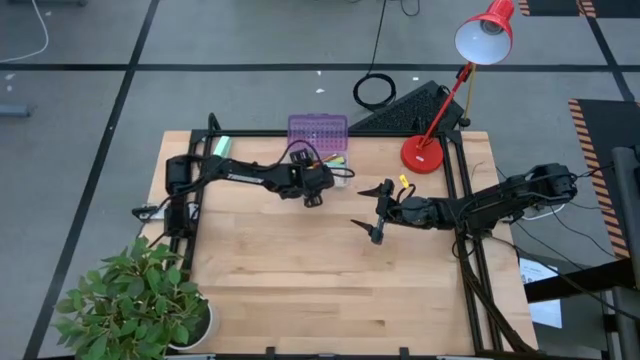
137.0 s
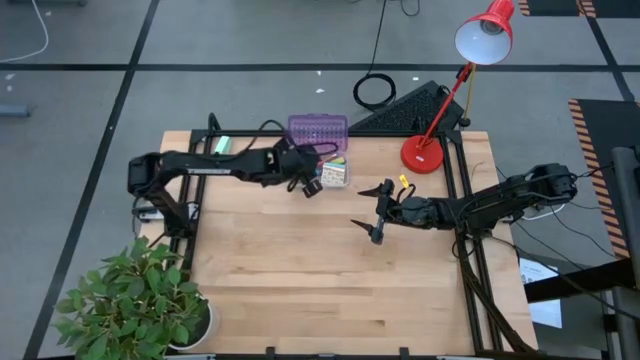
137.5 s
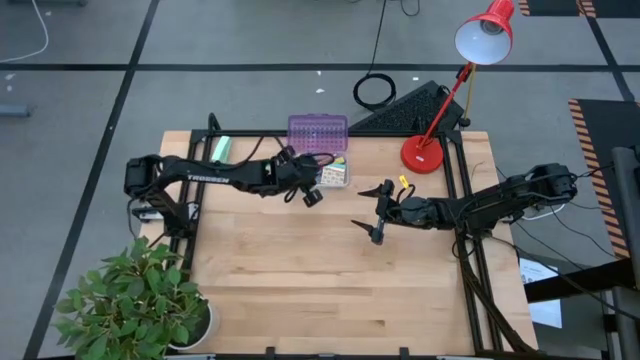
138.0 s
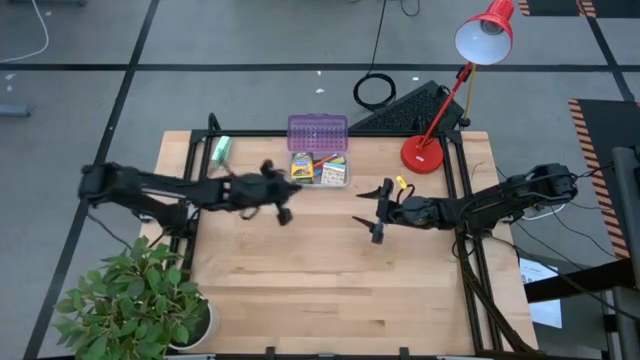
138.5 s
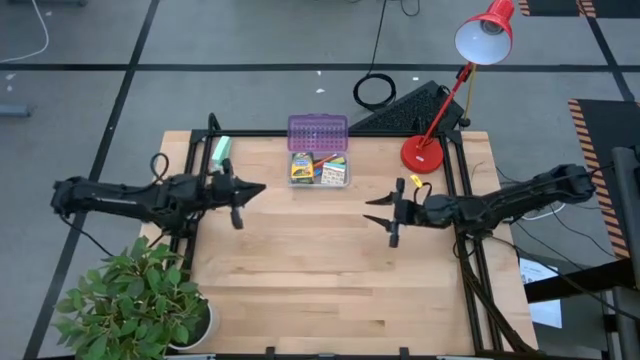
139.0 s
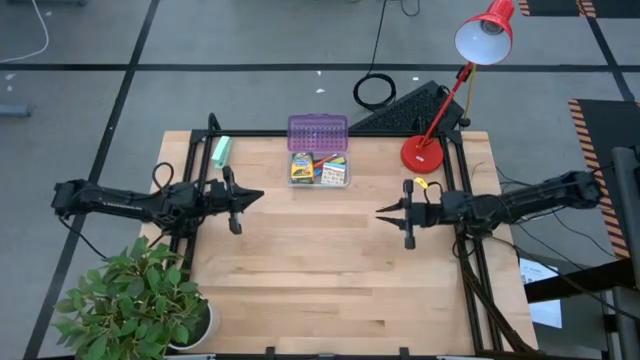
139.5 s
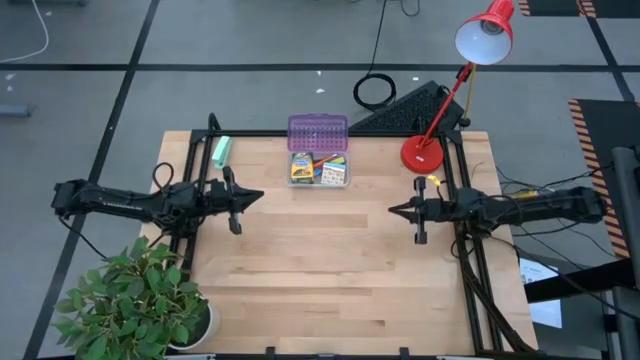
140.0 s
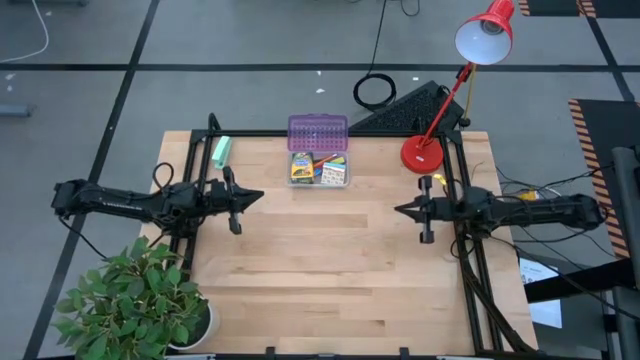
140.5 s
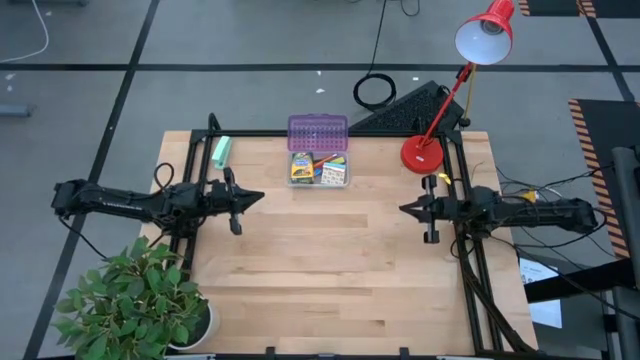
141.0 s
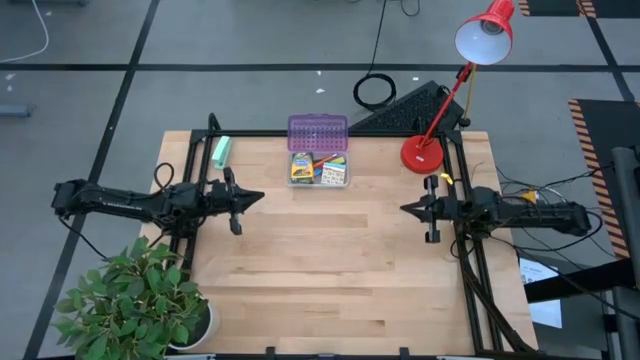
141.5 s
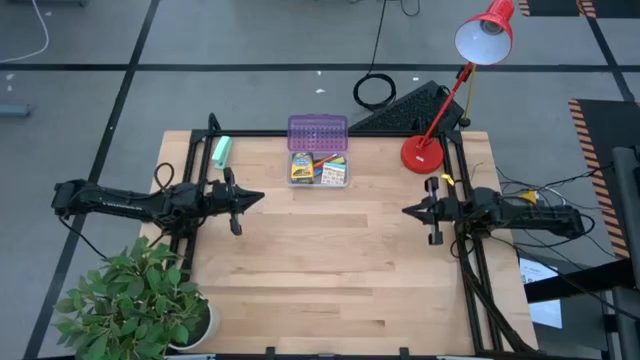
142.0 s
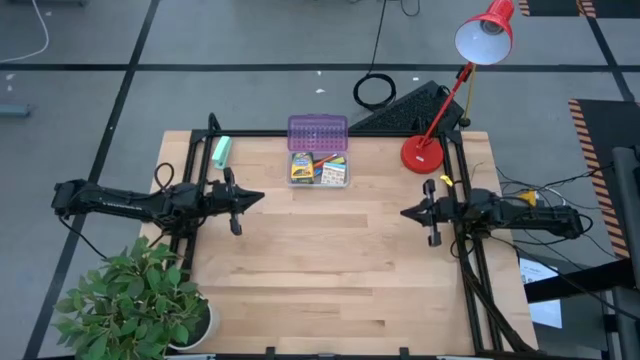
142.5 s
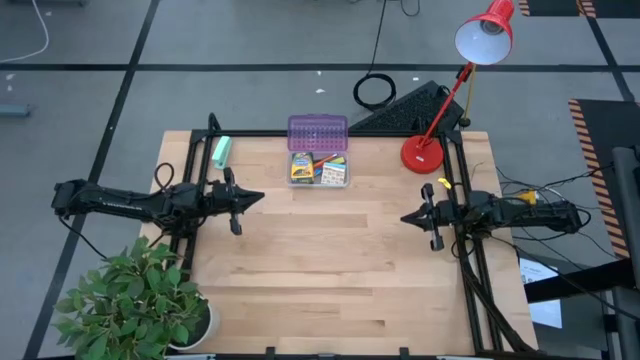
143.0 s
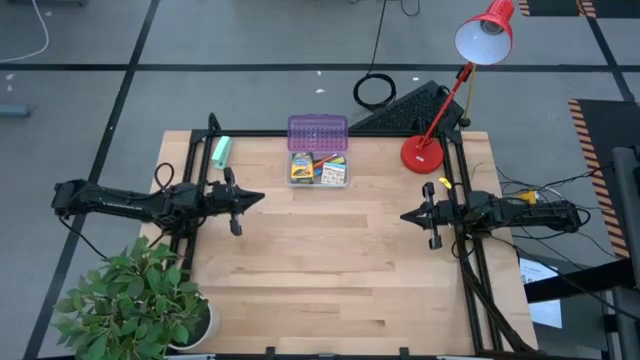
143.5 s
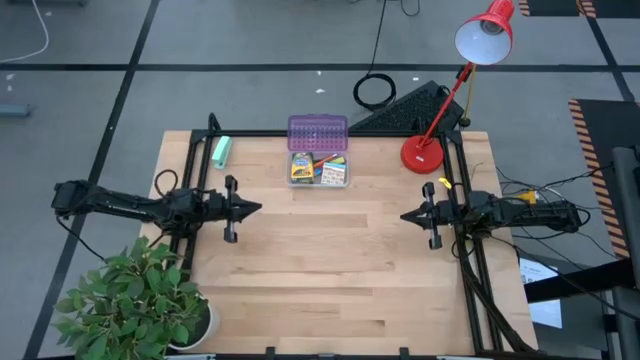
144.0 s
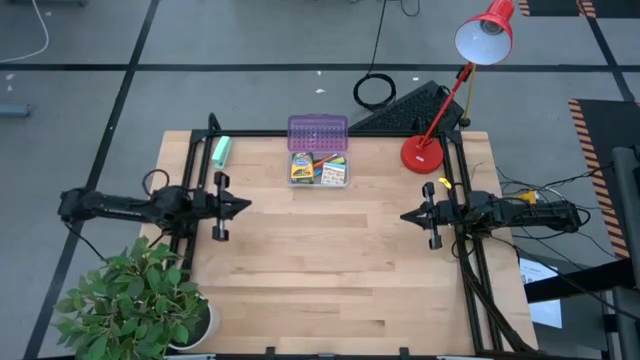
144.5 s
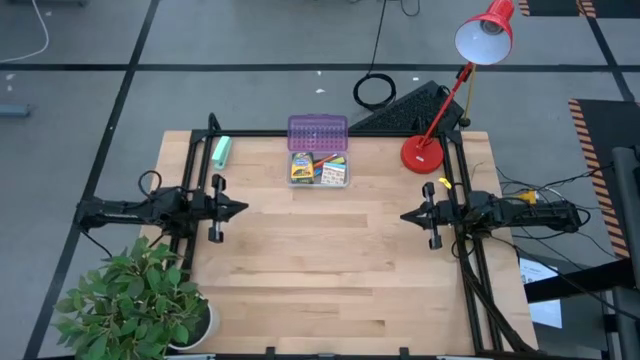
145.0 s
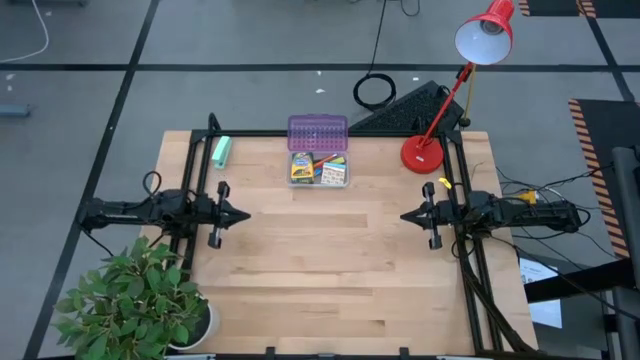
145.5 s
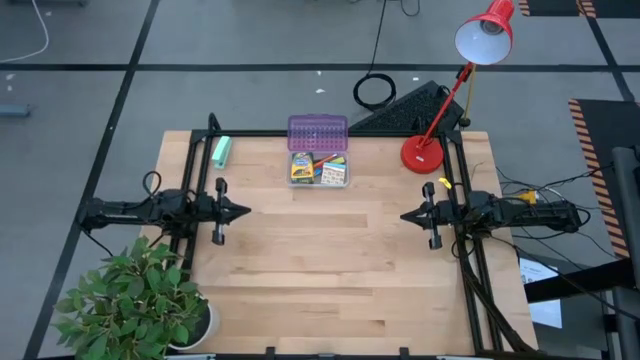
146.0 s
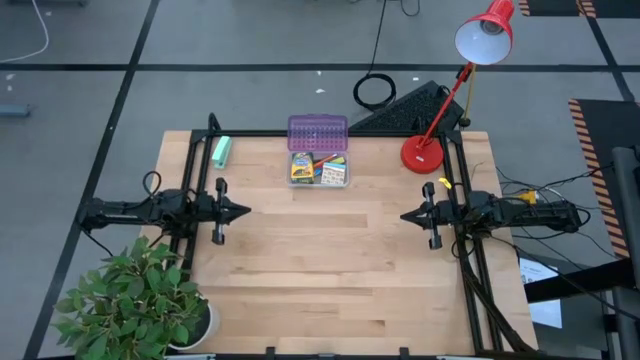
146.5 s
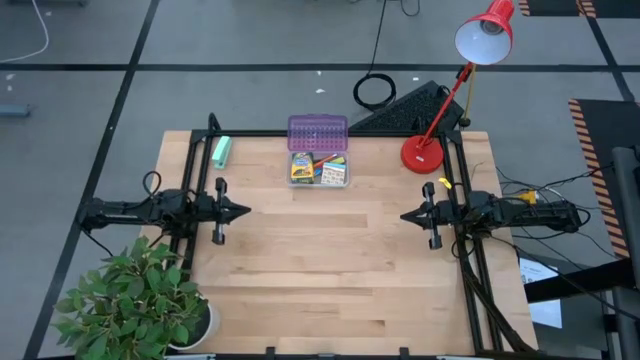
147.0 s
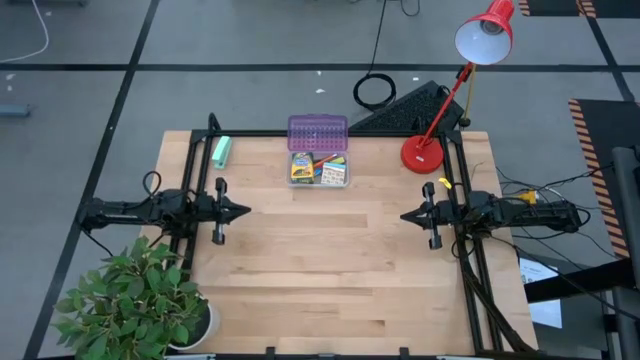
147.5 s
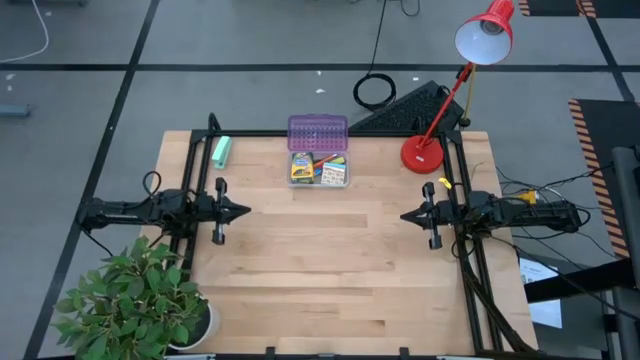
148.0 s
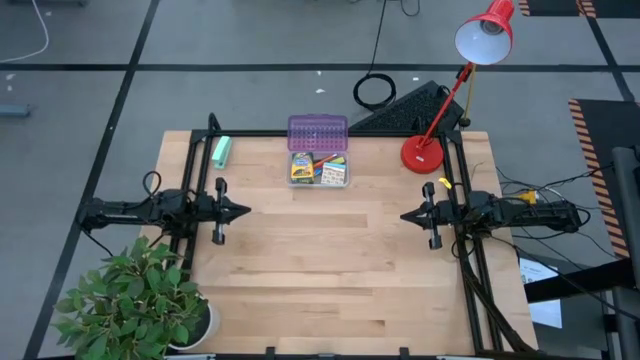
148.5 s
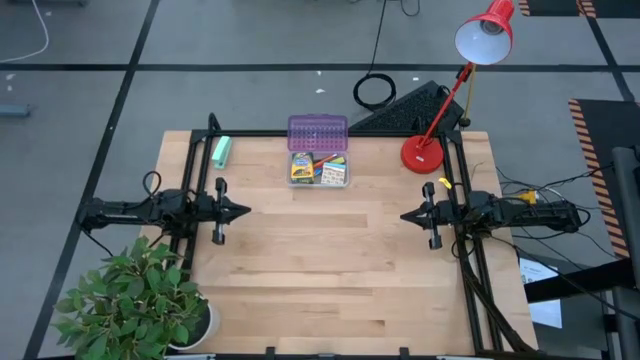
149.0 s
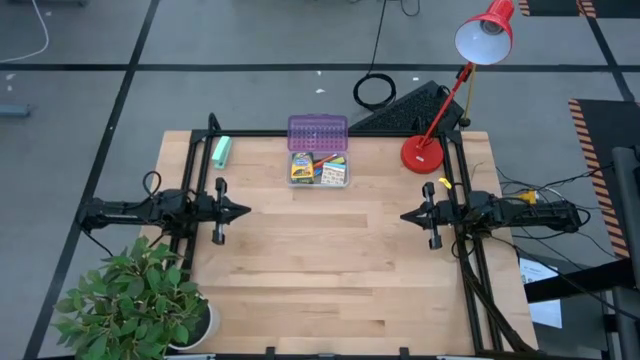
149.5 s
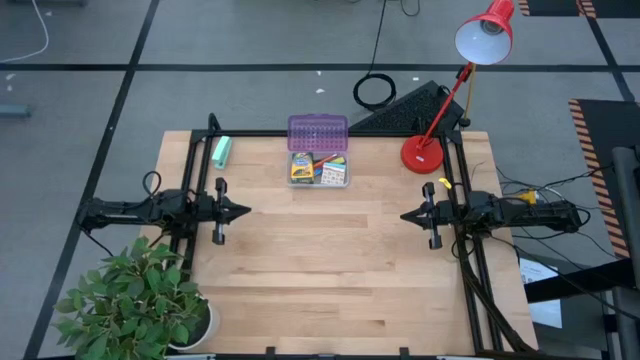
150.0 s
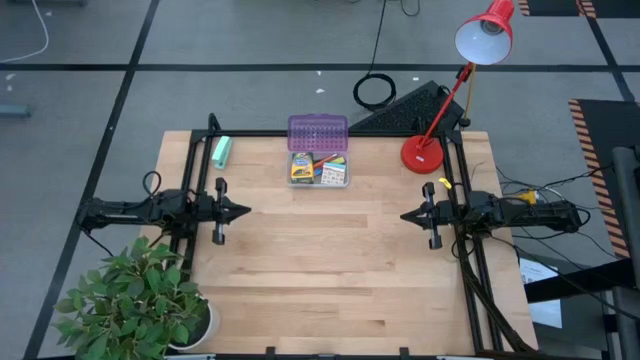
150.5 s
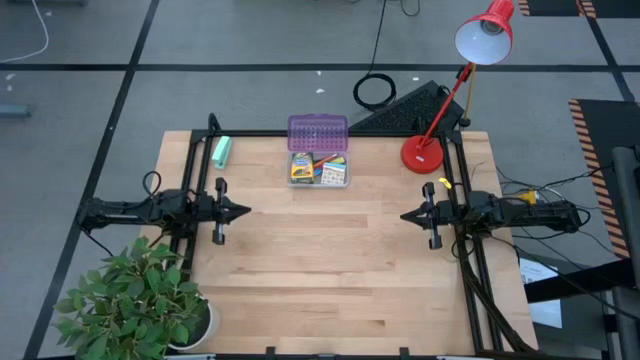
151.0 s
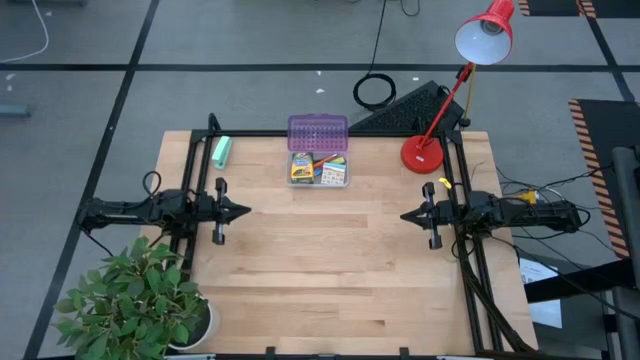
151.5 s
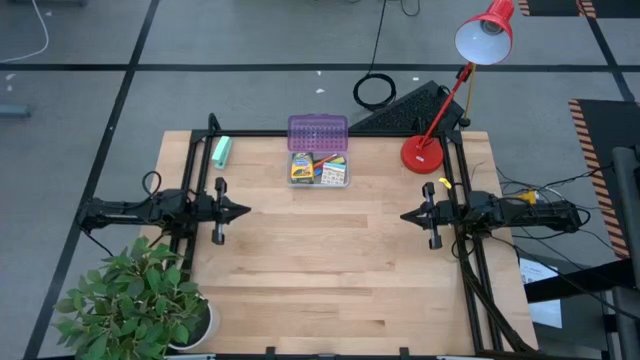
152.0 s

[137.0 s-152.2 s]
Task: Pack school essentials
Return to Home Position

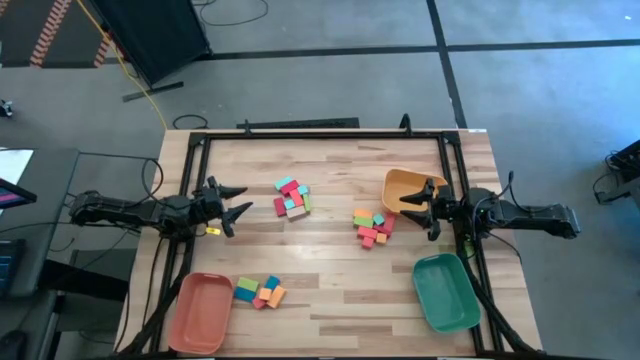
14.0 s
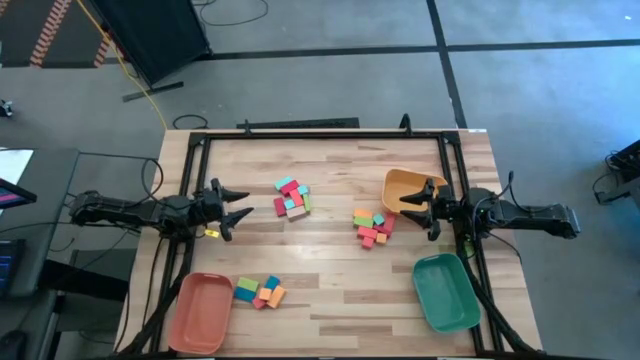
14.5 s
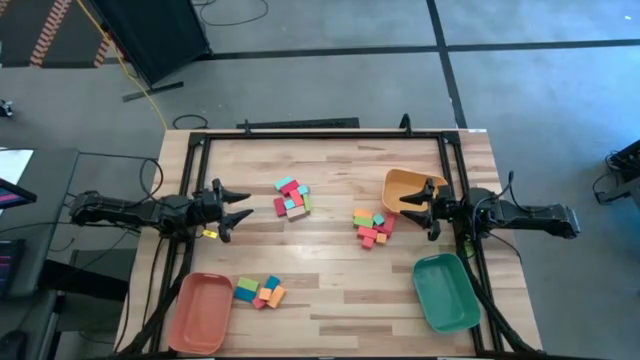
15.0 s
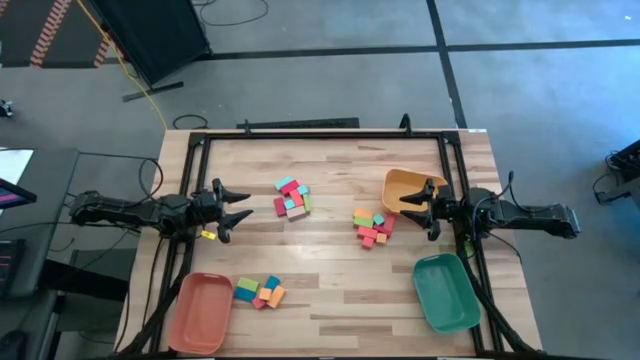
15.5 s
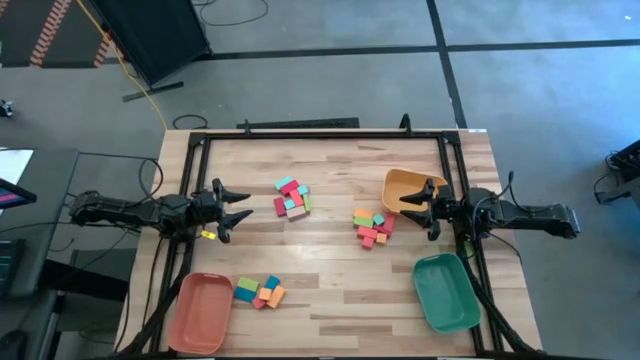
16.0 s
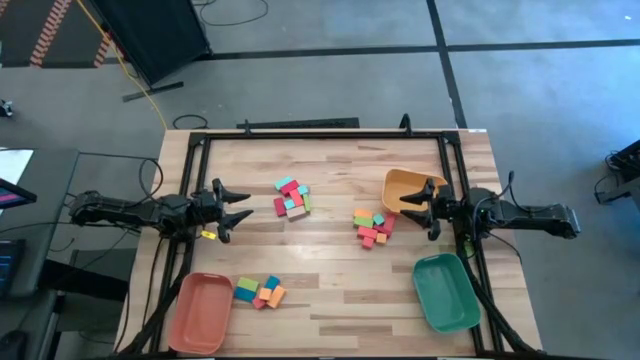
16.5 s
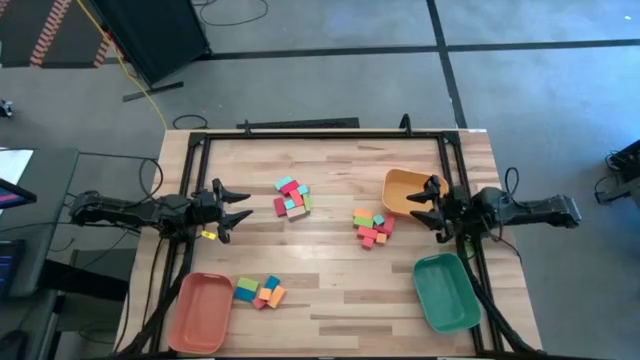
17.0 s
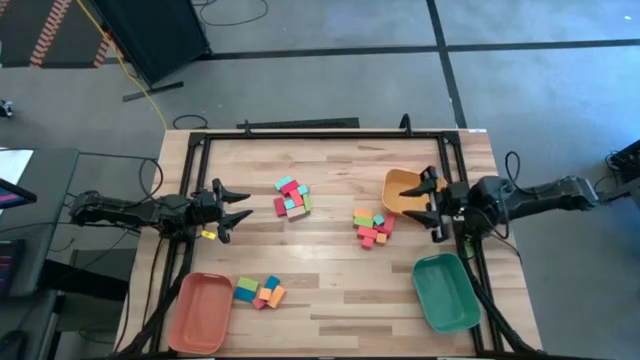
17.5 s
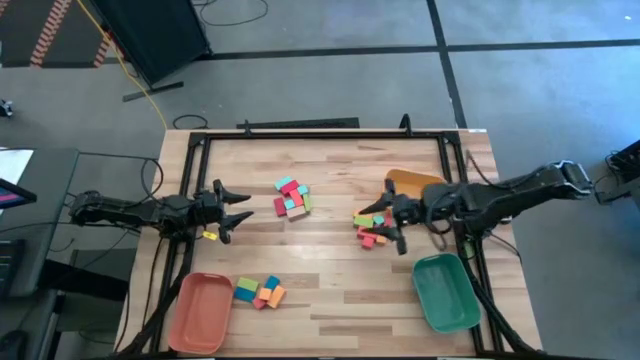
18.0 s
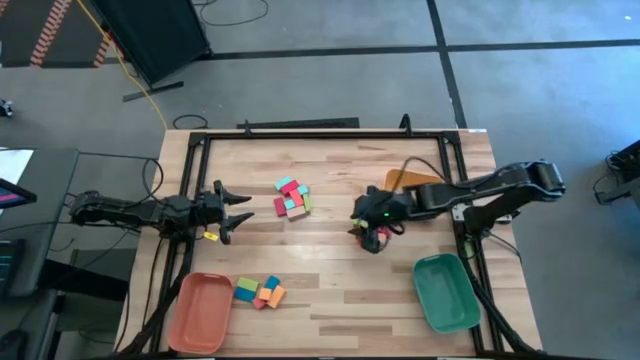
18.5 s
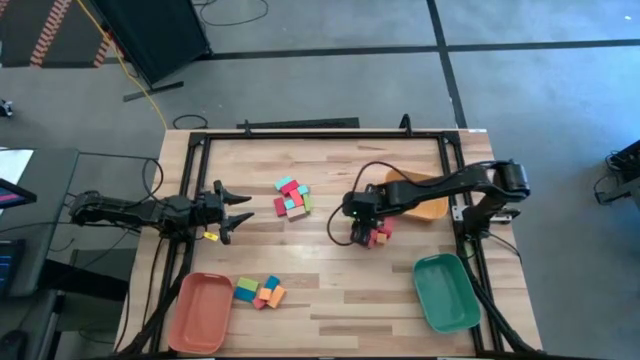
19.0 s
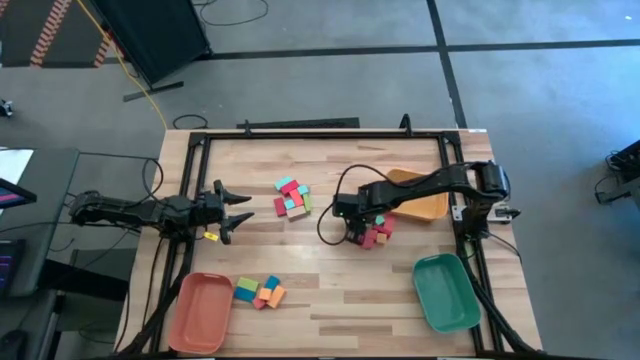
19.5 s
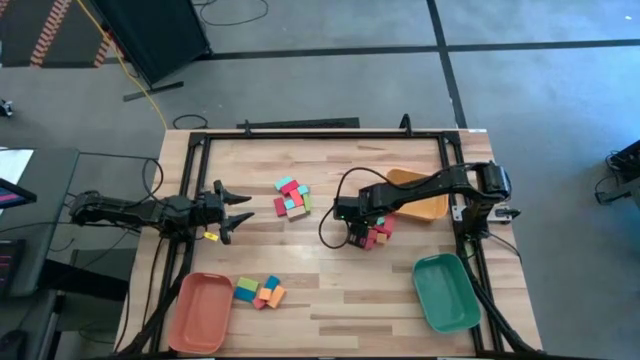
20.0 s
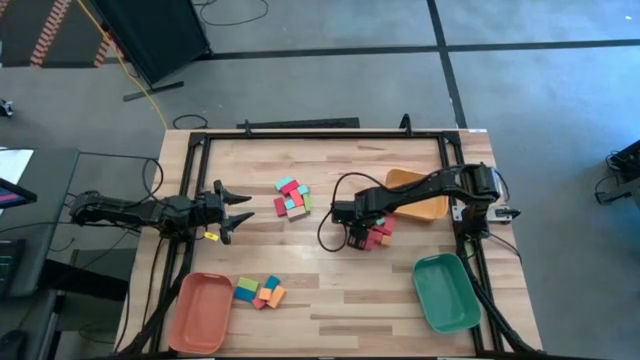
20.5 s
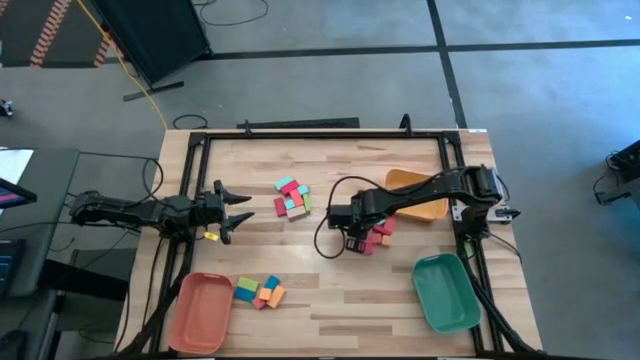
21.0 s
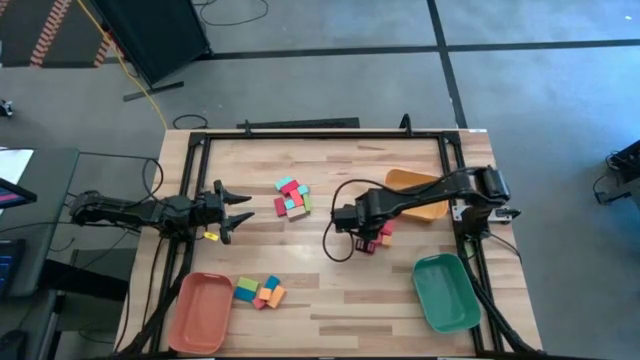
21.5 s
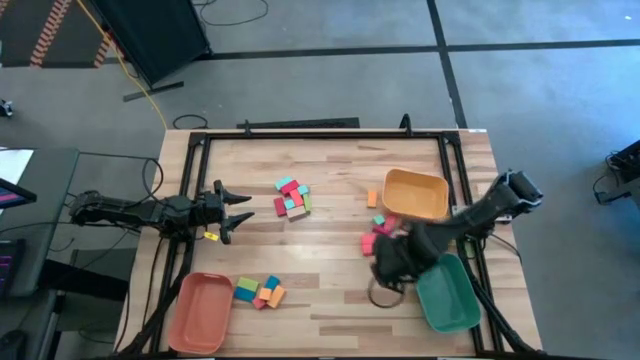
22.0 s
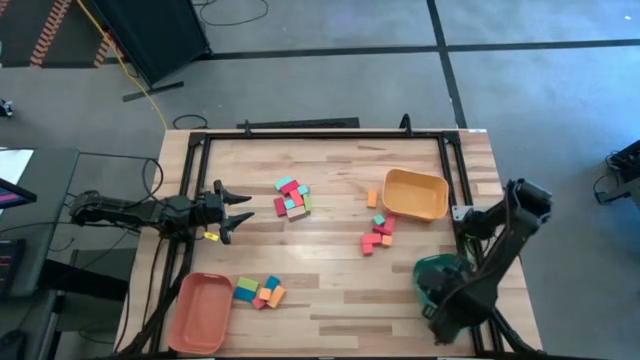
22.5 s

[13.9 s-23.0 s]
Task: Sort blocks by size
Put the large green block into the green bin
